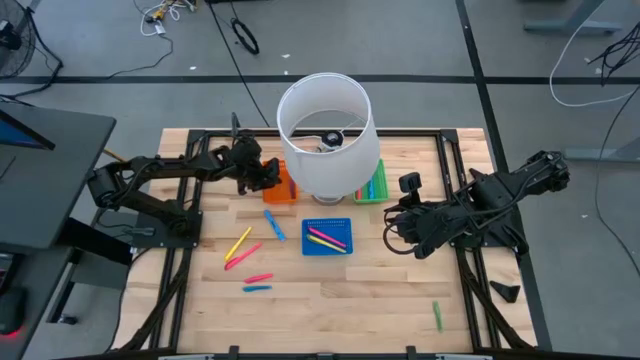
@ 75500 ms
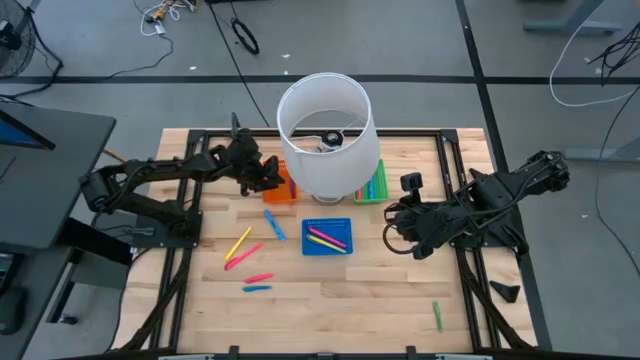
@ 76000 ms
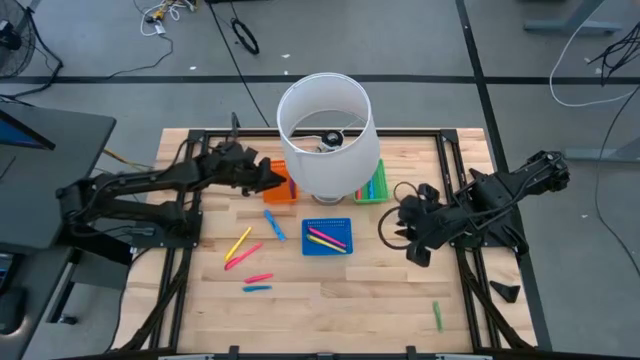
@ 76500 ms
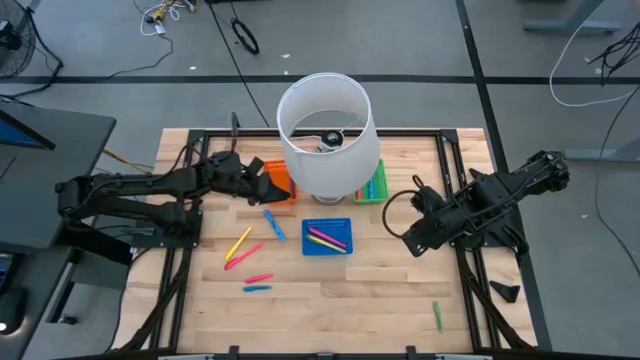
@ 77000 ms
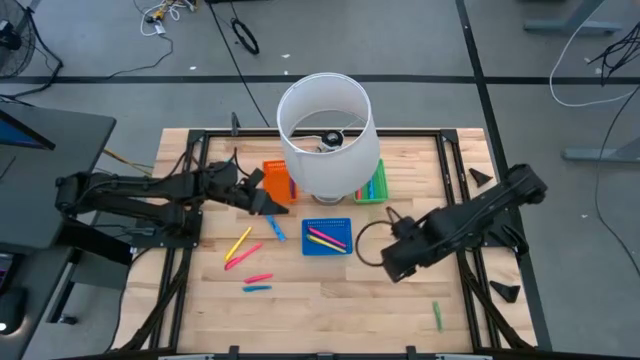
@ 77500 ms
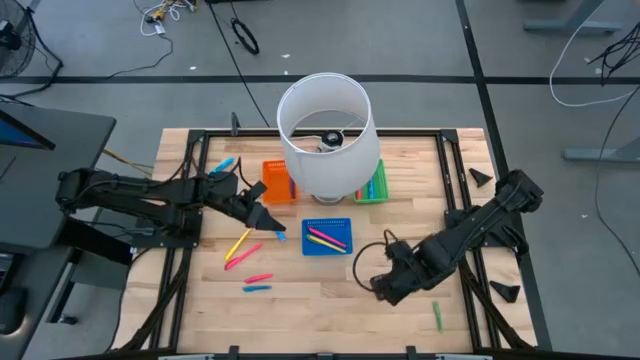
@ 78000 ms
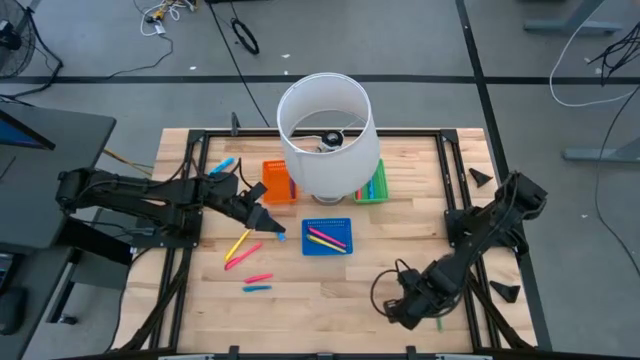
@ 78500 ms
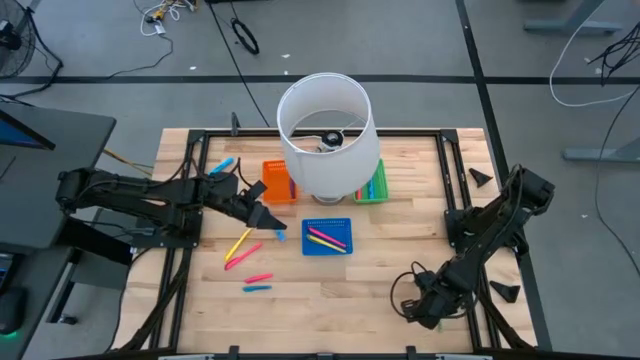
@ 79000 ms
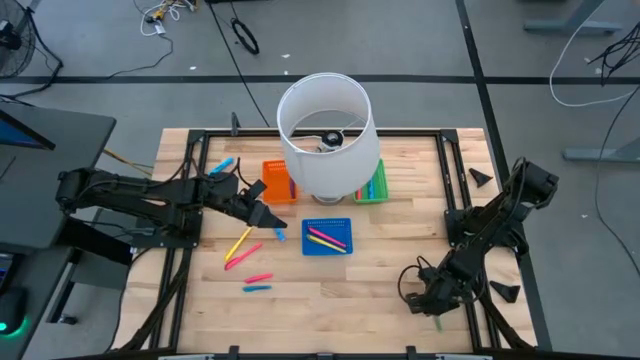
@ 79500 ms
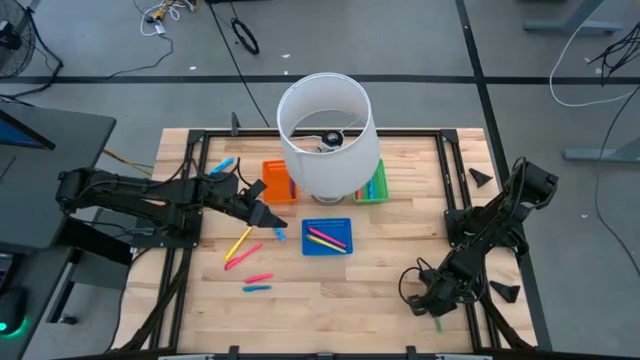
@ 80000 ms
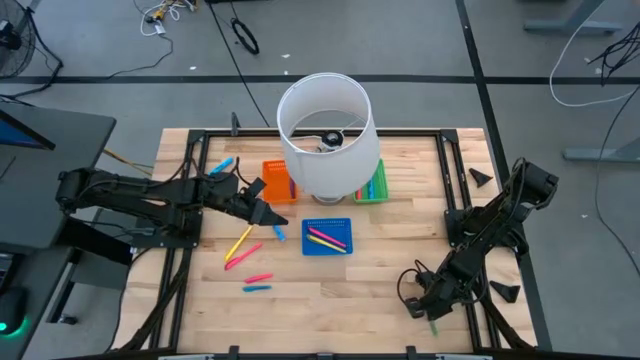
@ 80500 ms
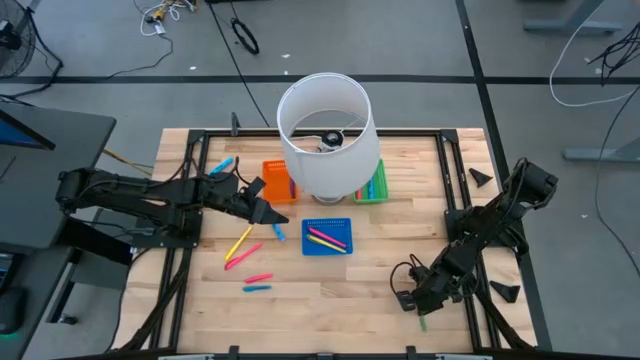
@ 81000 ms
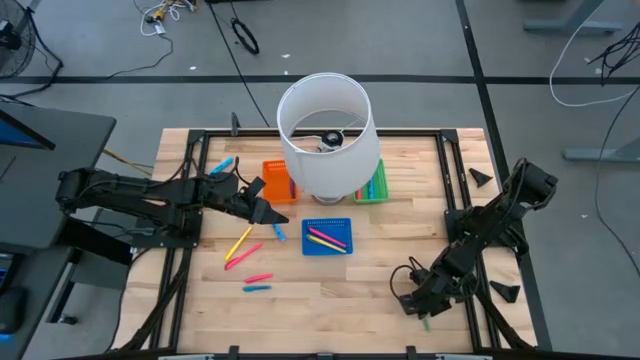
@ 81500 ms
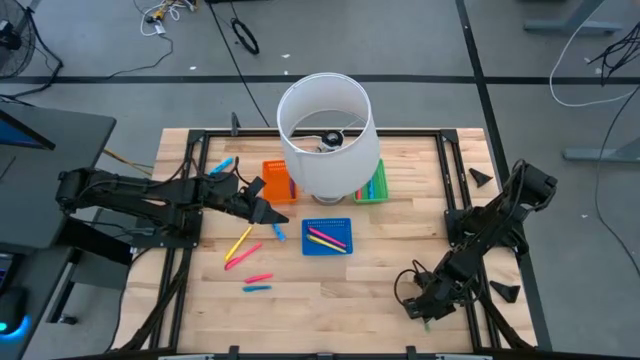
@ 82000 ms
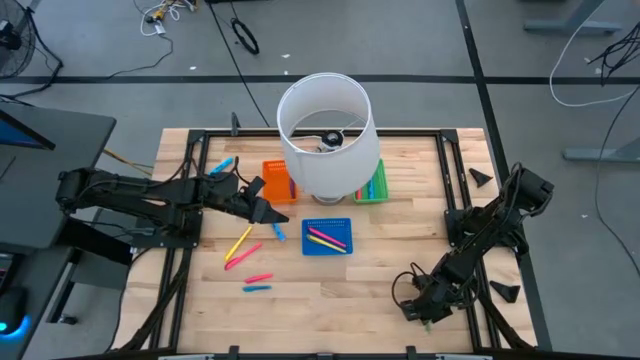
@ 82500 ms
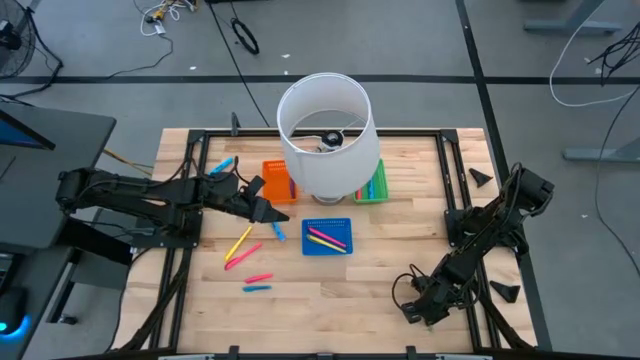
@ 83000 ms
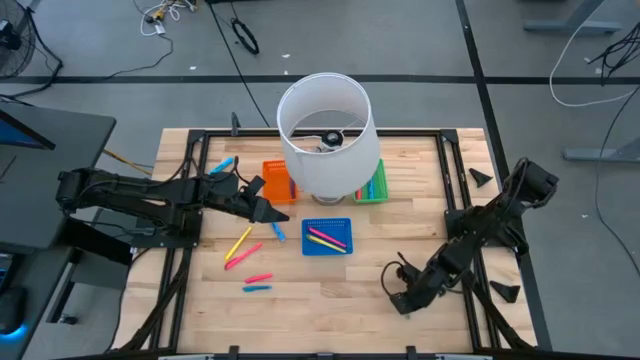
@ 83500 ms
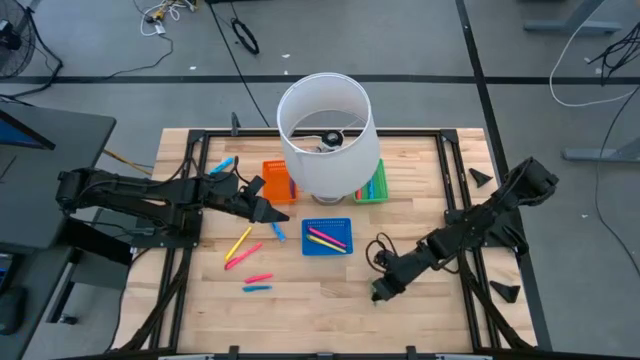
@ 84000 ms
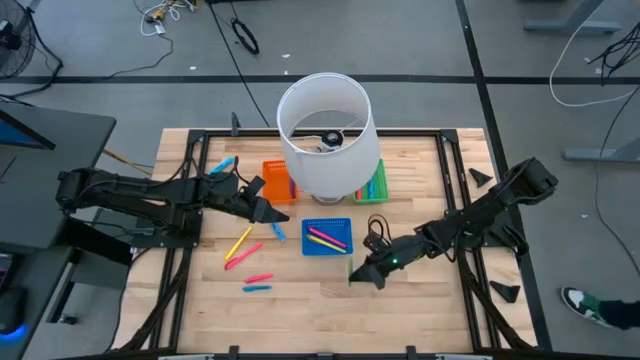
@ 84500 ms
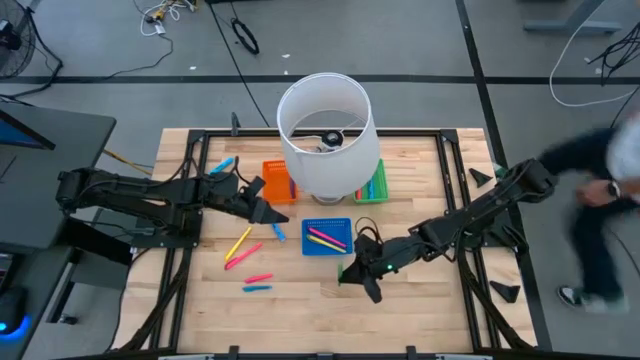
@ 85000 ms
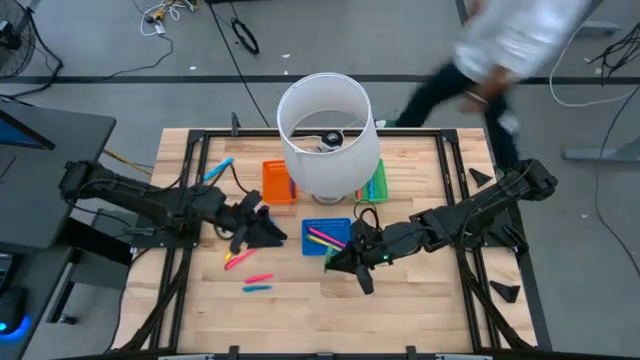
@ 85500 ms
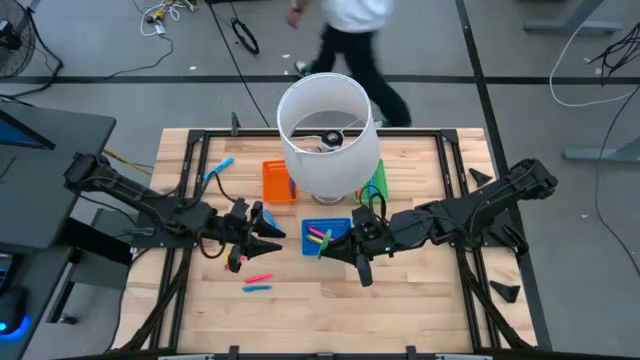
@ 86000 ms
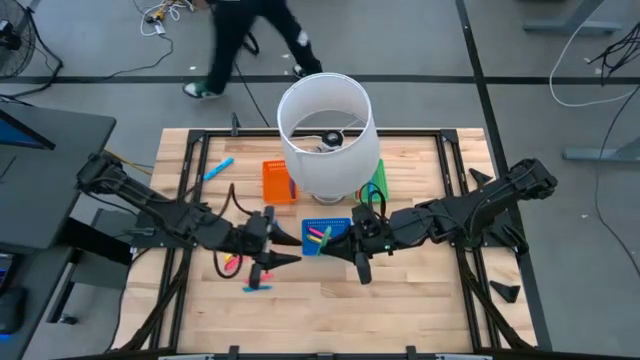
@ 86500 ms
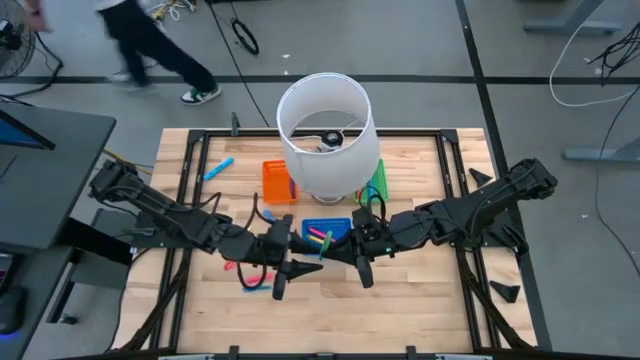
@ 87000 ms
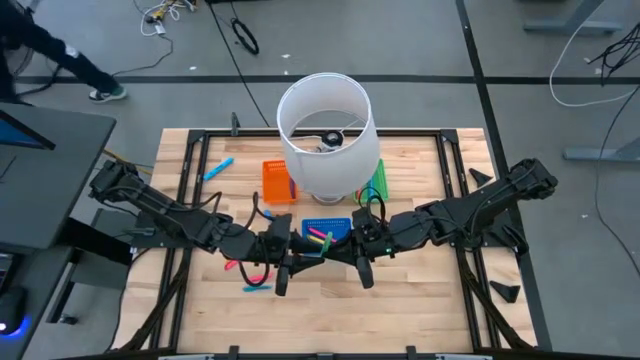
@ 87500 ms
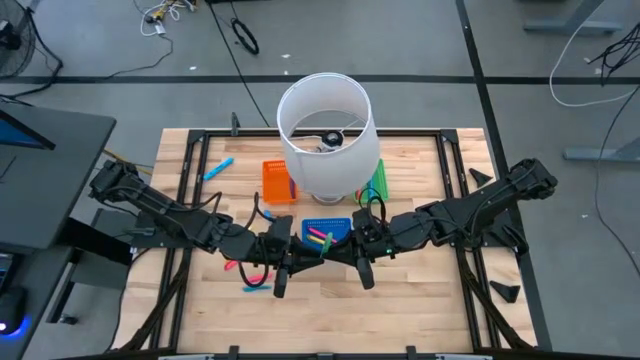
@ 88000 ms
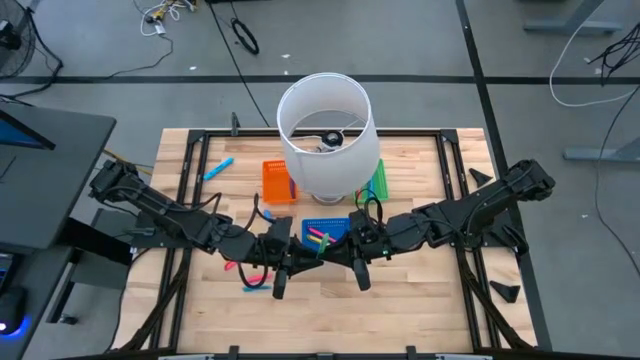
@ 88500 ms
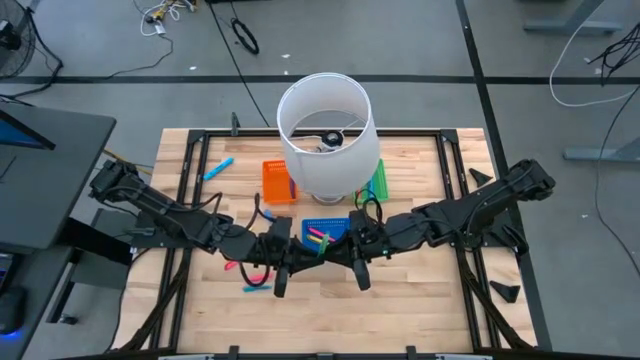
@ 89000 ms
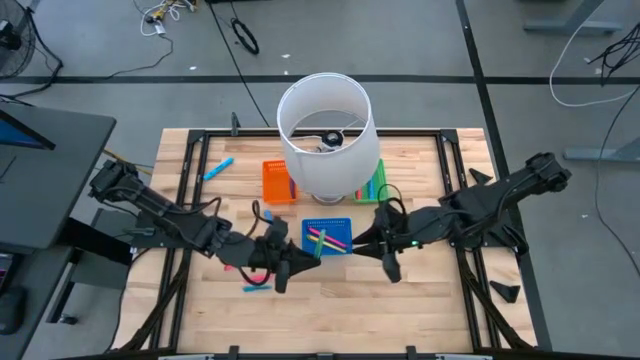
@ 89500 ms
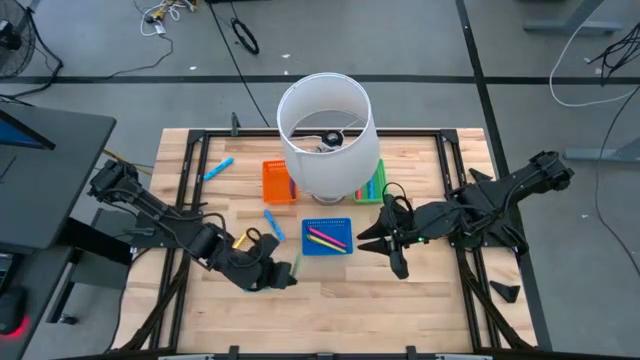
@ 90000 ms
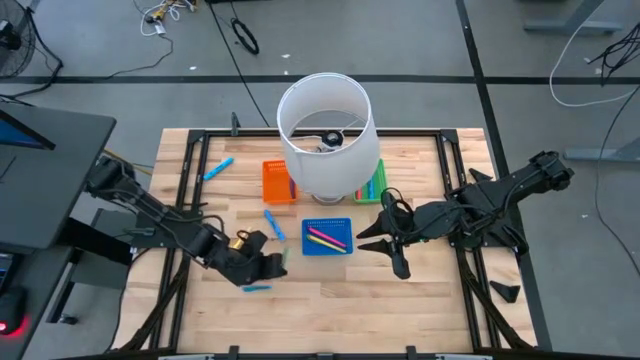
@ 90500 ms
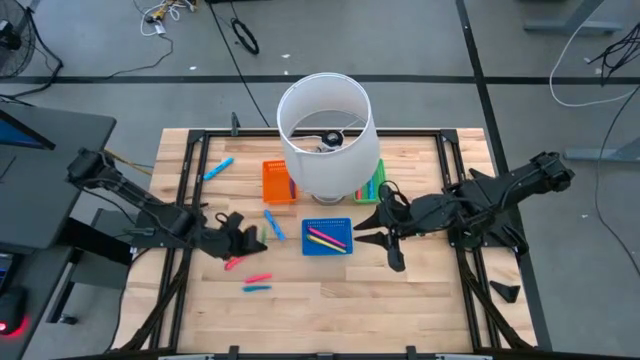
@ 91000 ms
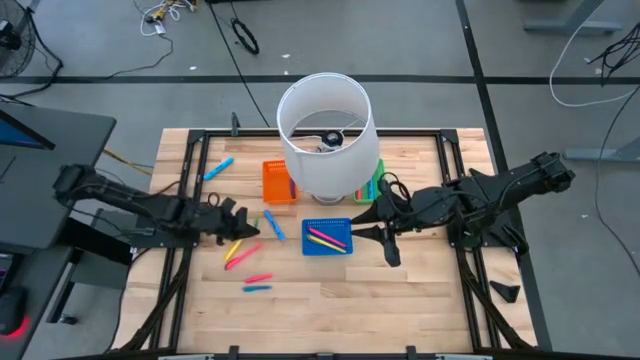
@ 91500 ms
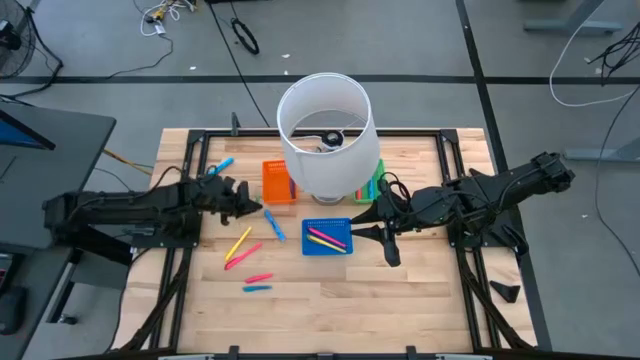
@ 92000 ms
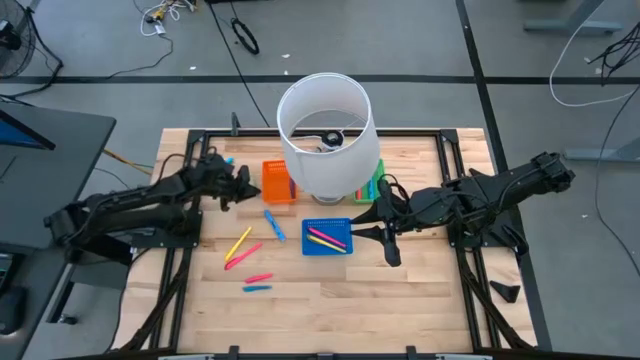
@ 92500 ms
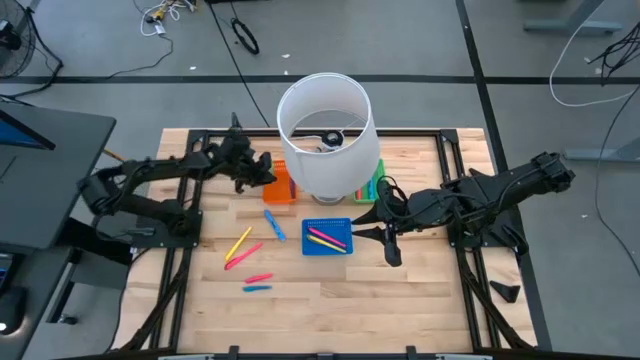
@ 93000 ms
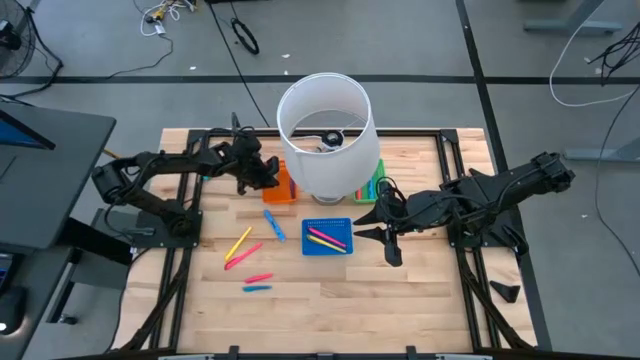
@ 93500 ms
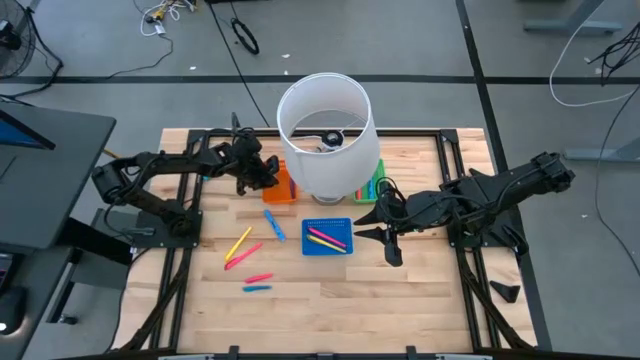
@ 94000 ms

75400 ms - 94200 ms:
Task: Pick & Place Markers
Put the green small highlighter pen into the orange bin
